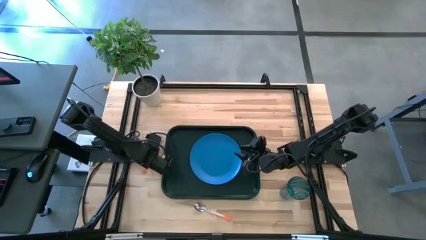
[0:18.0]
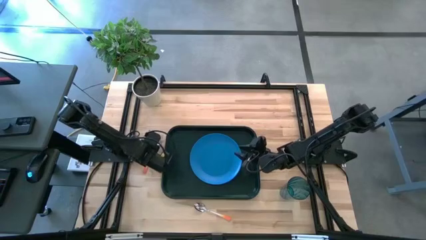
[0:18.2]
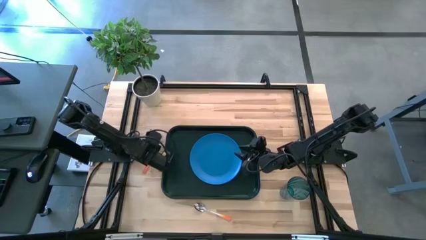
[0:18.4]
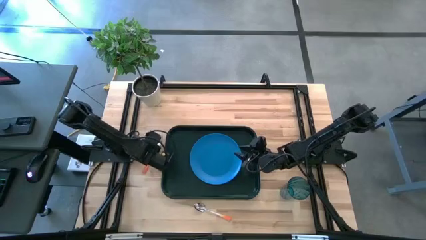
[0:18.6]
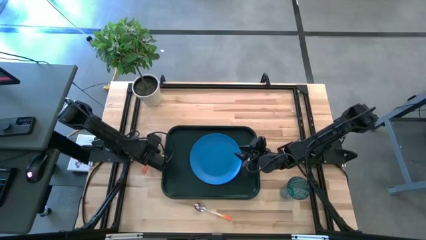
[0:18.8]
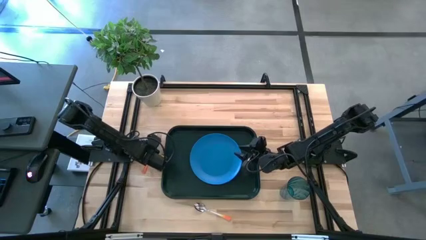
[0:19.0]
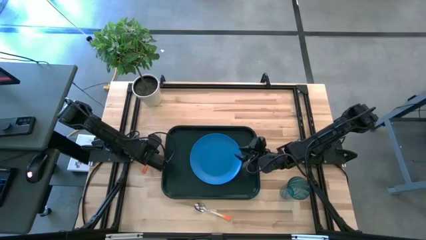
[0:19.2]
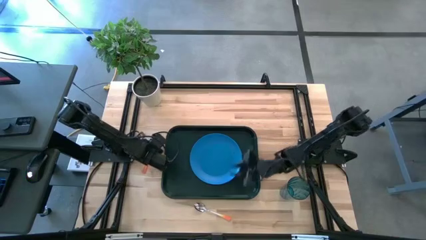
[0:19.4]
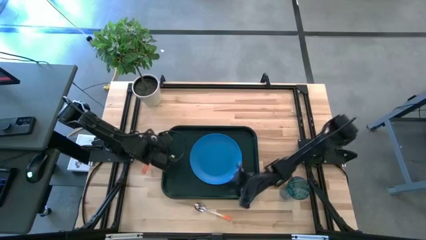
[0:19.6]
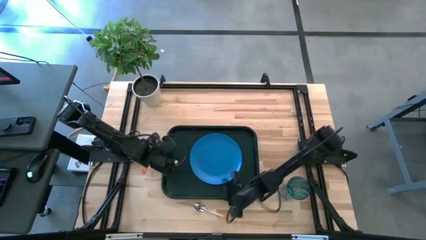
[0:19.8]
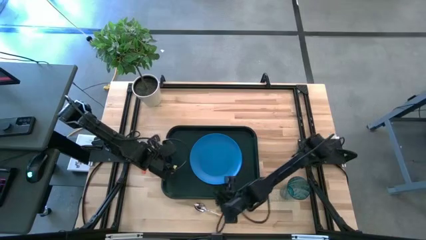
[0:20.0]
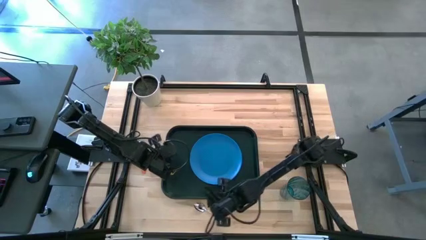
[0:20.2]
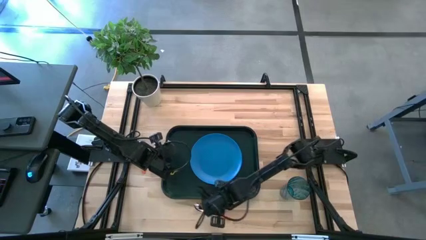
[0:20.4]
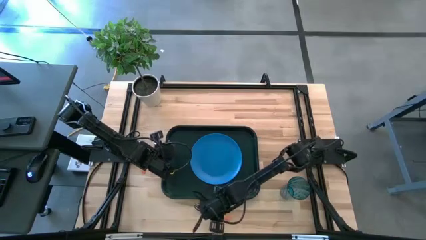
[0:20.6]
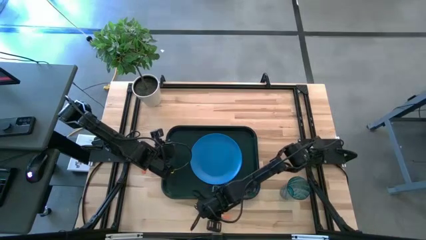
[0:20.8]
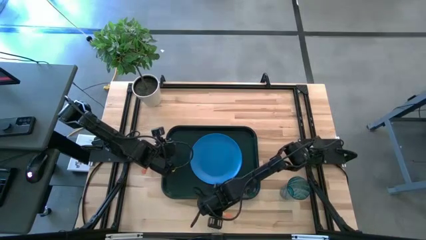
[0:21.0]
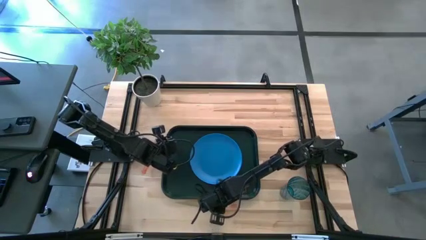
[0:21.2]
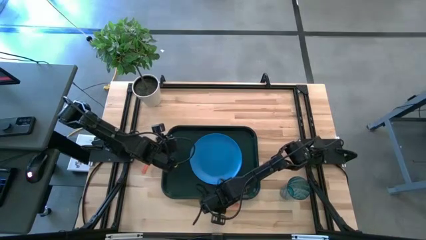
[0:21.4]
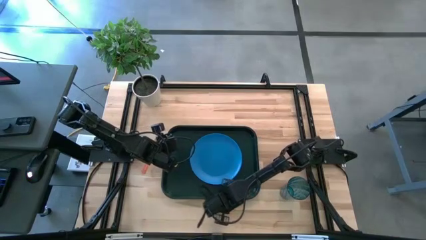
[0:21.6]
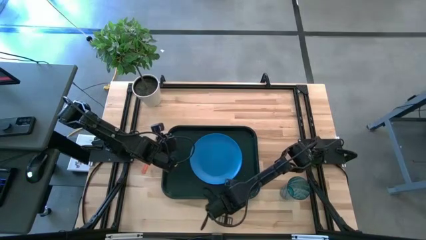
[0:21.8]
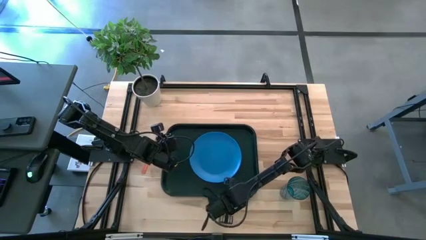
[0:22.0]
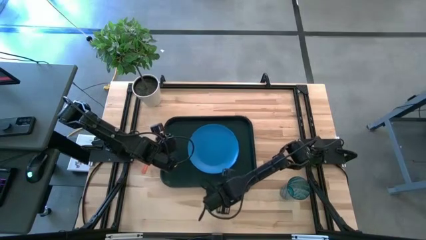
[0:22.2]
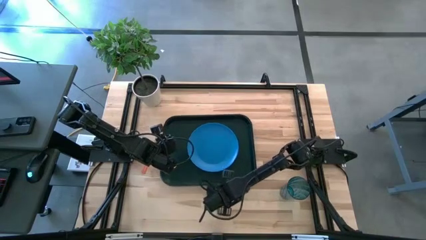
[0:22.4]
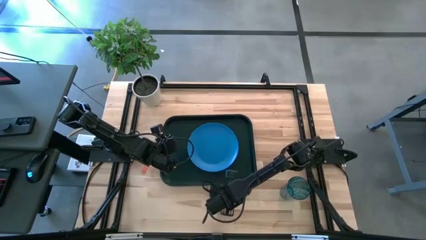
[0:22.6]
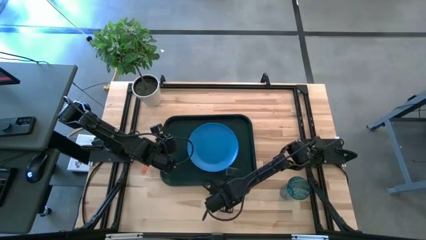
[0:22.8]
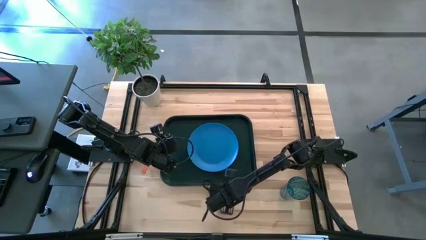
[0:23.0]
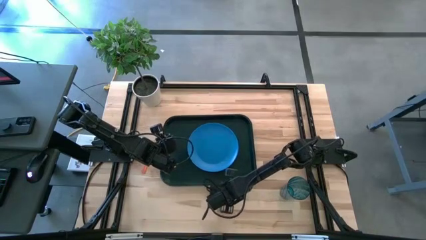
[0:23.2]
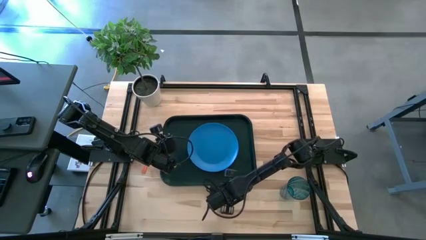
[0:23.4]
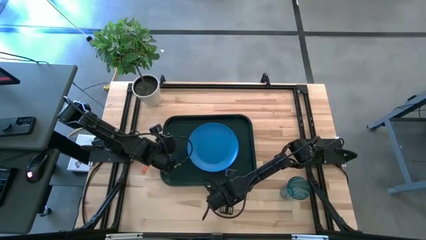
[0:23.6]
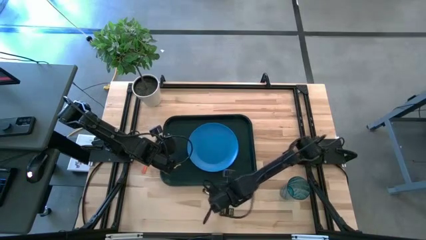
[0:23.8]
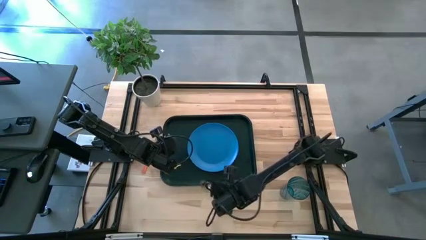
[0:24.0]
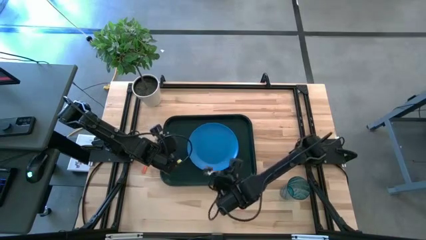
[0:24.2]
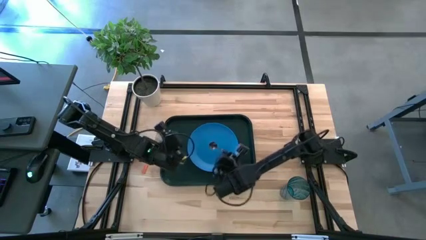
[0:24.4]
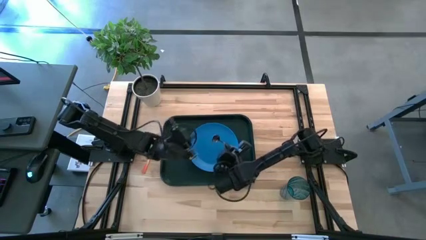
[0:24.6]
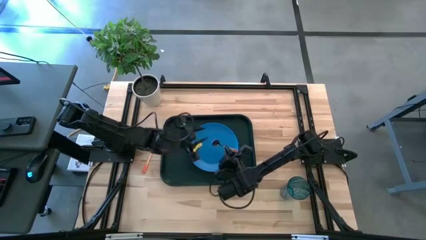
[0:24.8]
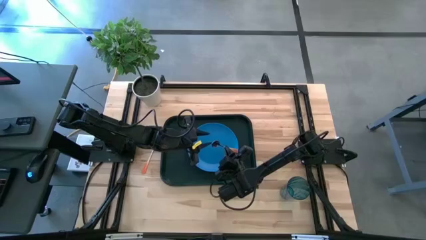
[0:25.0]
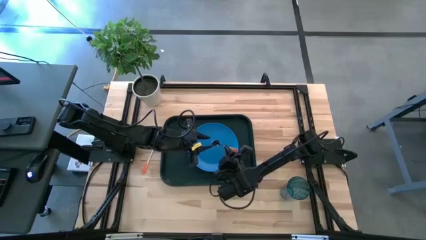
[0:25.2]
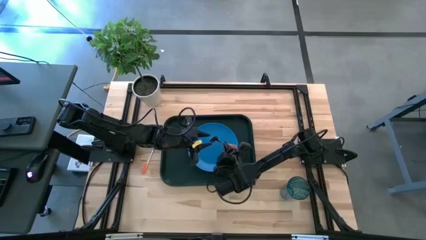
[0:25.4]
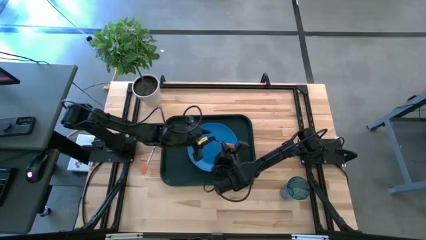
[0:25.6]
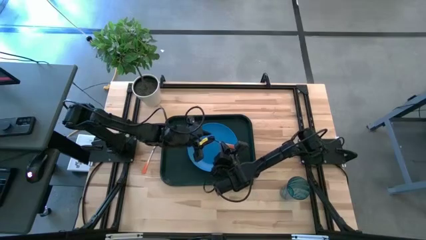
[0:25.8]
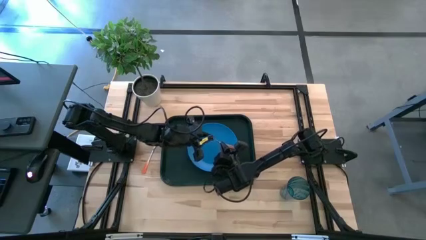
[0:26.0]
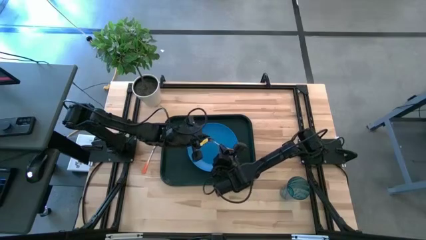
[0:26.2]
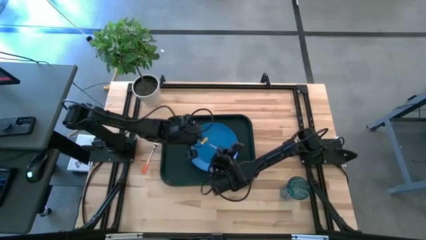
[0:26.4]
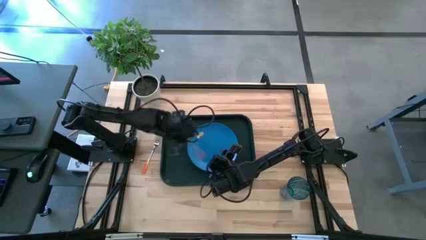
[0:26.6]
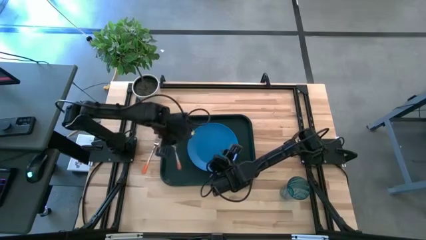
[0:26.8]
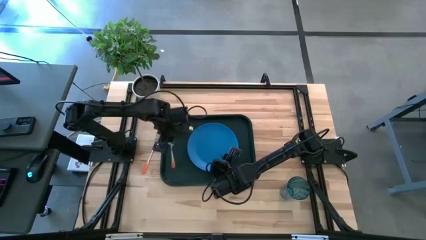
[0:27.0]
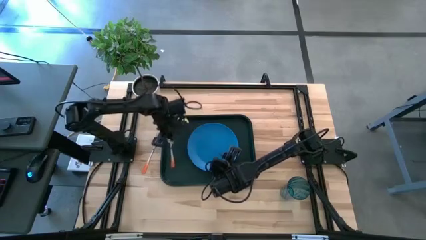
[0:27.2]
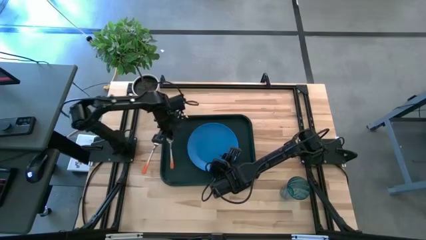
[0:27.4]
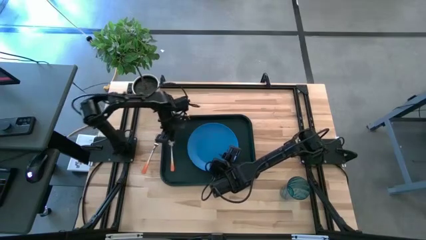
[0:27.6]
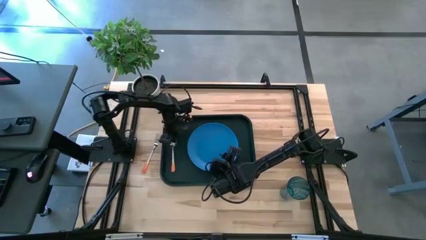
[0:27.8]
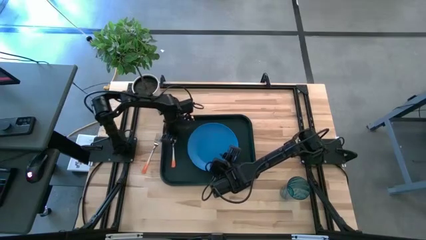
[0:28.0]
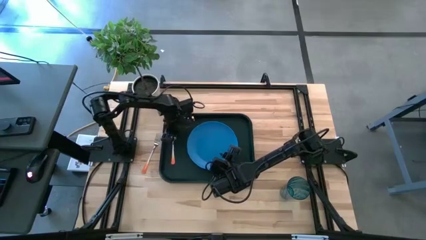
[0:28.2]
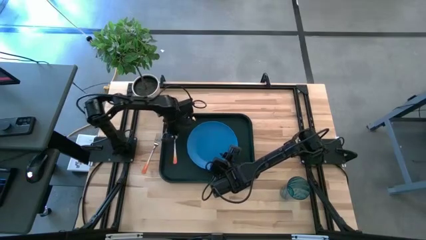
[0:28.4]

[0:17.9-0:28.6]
Task: Pick and place plate/cup/fork/spoon on tray
Put the orange spoon on the black tray beside the blue plate

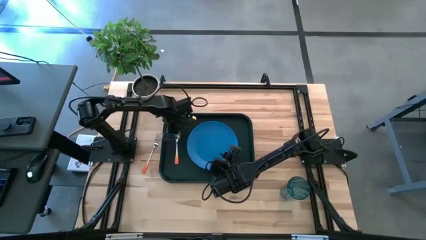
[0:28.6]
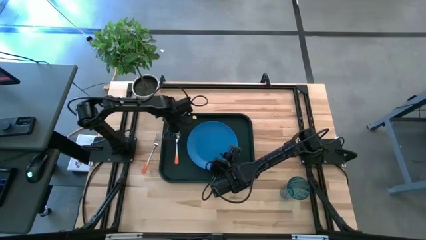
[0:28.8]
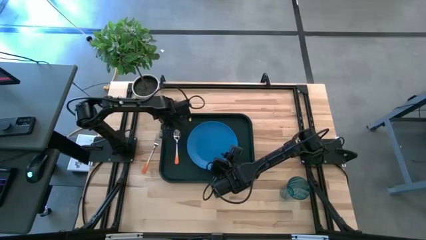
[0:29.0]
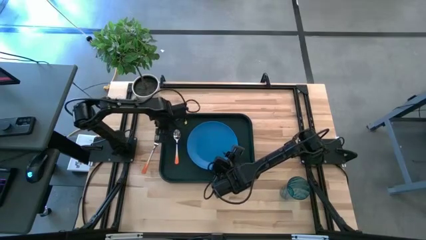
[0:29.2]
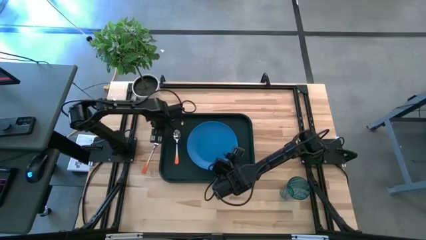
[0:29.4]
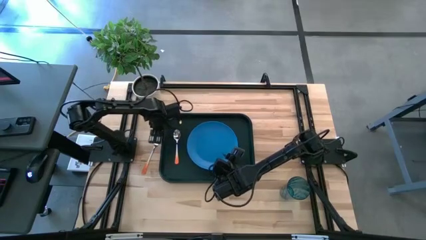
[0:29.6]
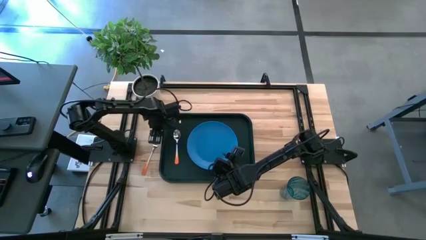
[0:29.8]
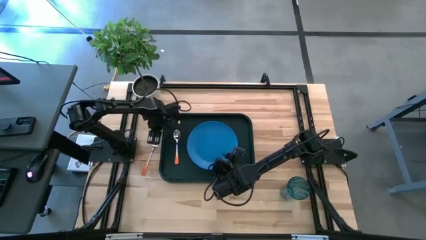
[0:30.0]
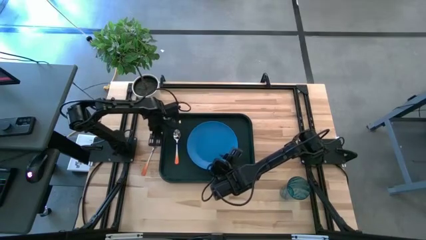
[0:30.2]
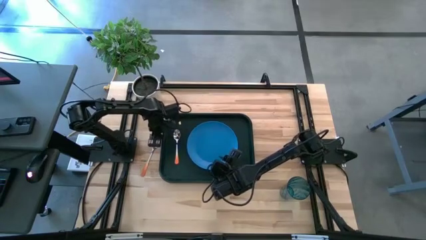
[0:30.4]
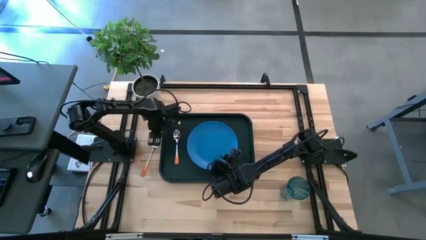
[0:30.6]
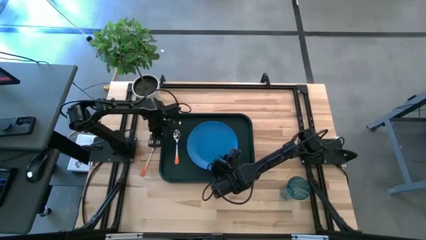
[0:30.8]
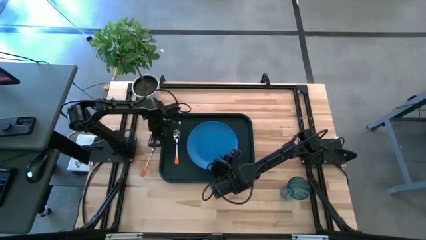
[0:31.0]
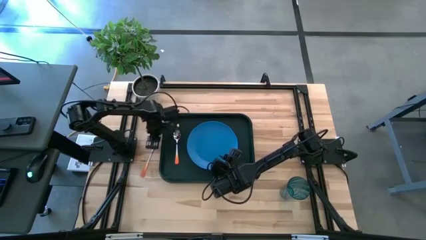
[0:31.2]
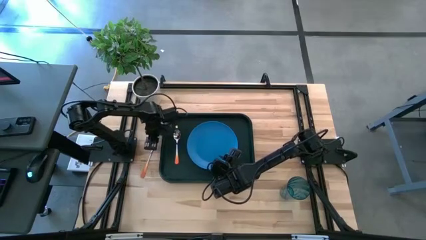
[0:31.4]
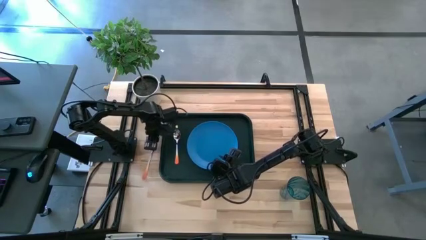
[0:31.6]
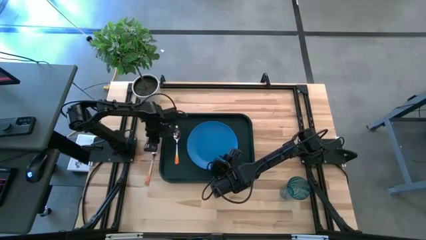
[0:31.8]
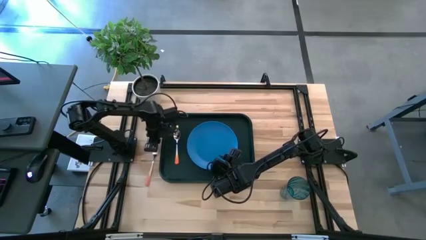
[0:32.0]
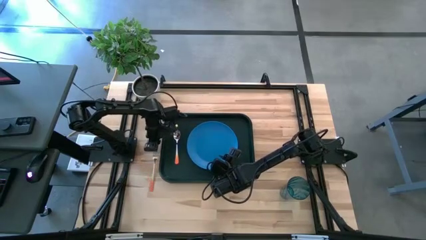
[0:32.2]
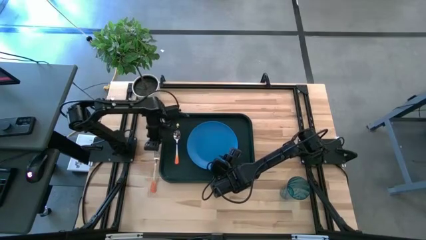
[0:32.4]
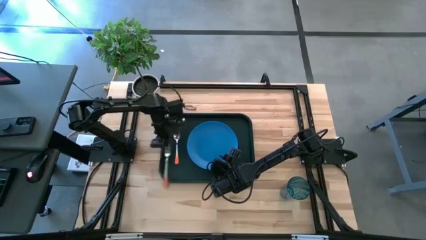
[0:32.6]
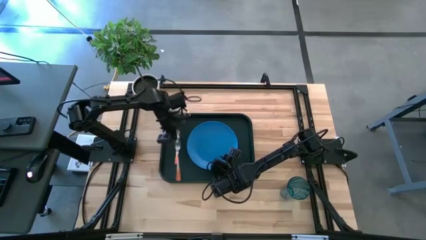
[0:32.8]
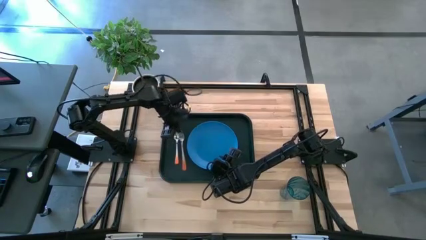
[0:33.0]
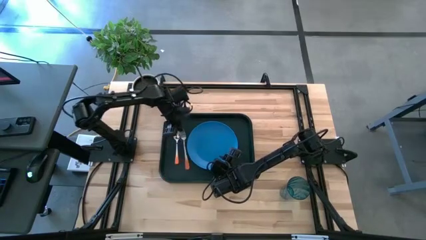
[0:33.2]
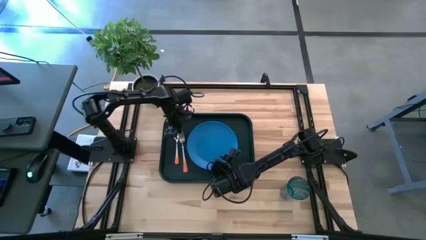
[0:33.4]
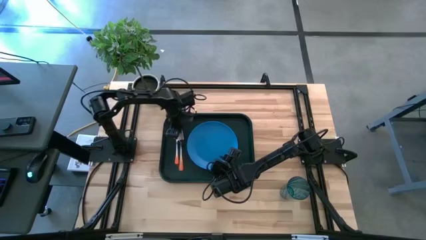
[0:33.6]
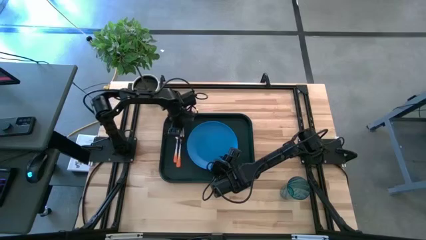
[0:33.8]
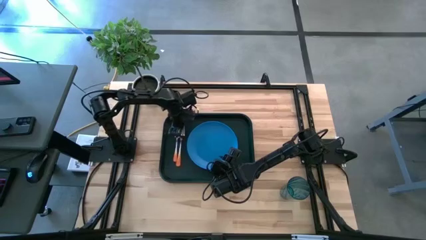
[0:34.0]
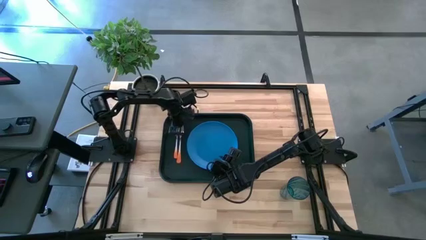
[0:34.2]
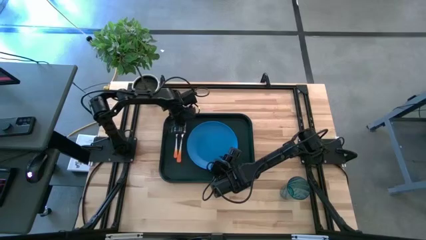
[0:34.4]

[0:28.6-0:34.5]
Put the orange fork on the black tray, between the orange spoon and the blue plate
